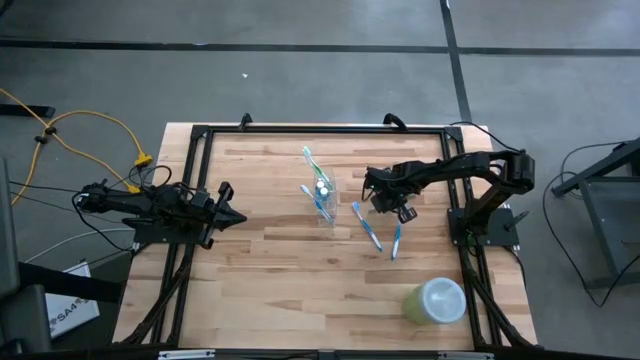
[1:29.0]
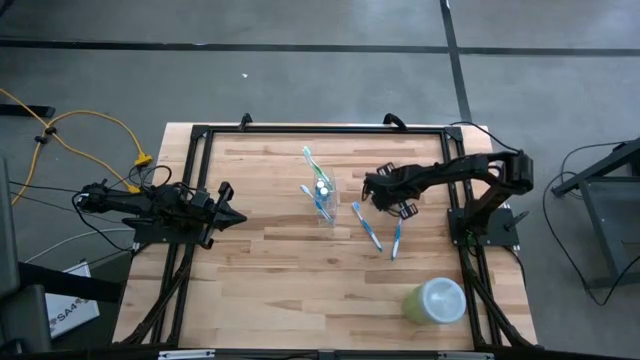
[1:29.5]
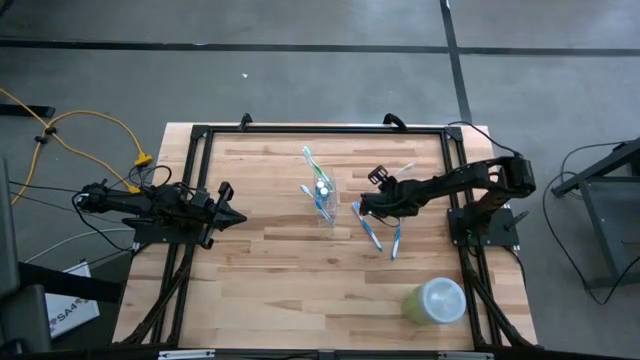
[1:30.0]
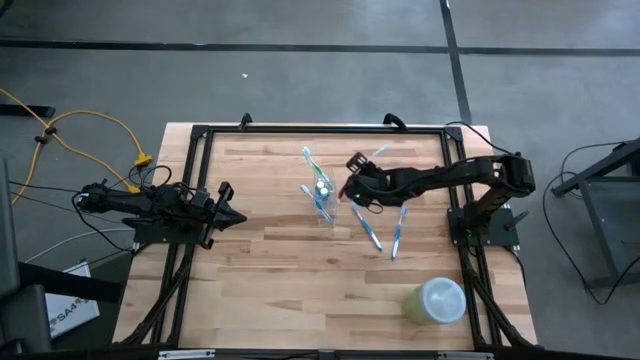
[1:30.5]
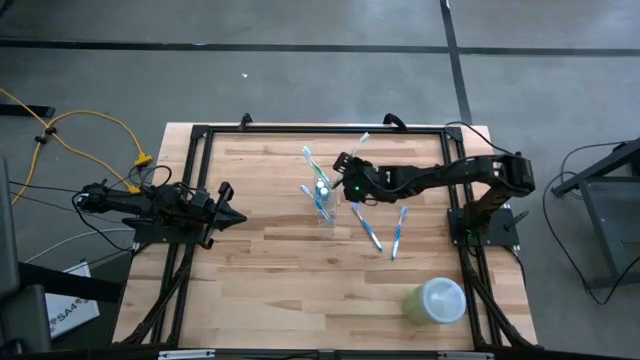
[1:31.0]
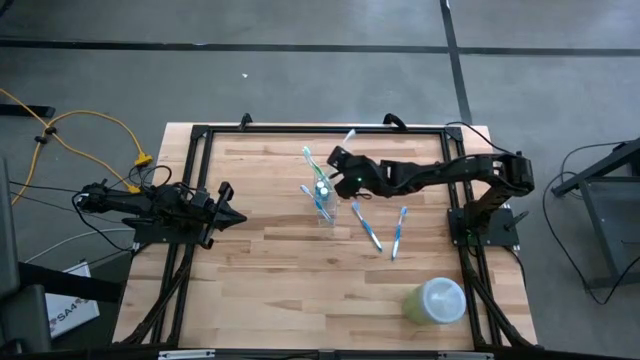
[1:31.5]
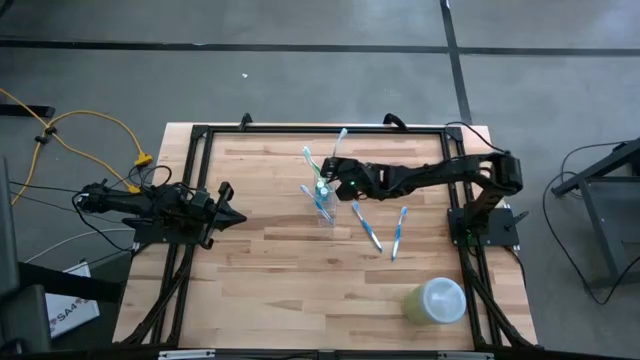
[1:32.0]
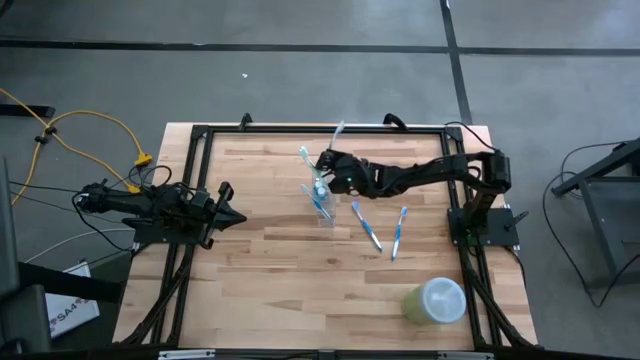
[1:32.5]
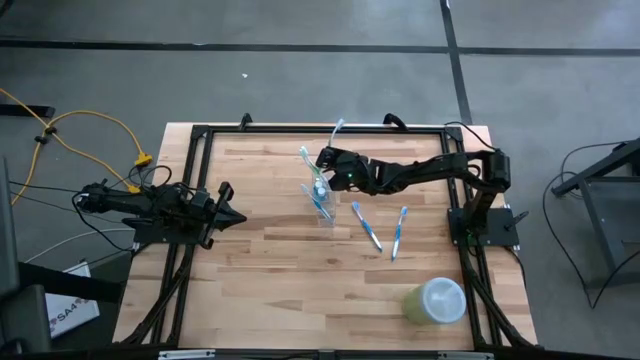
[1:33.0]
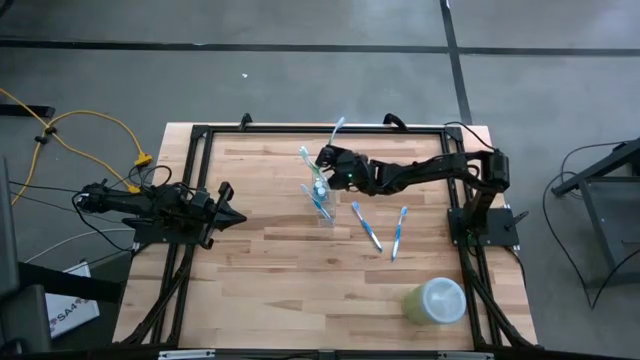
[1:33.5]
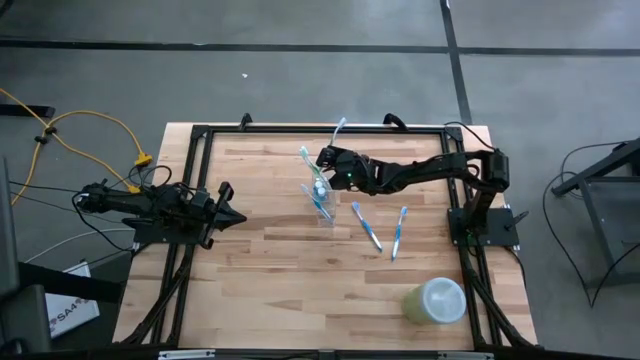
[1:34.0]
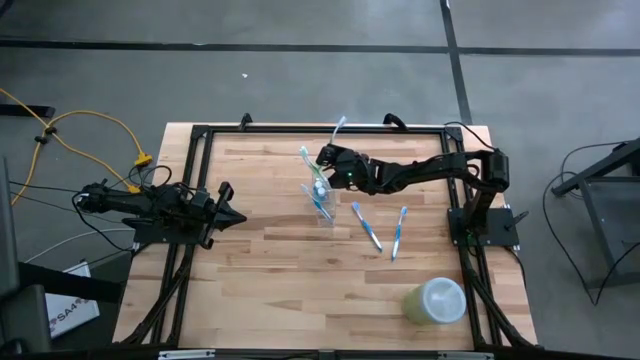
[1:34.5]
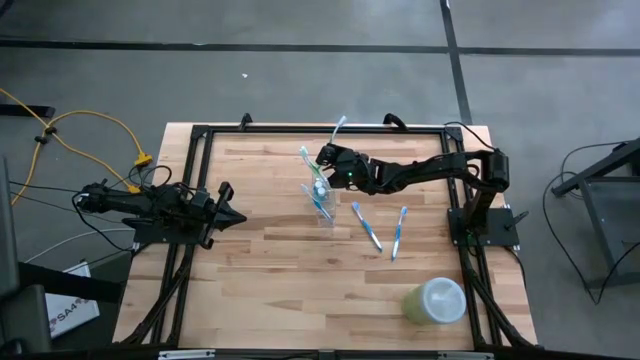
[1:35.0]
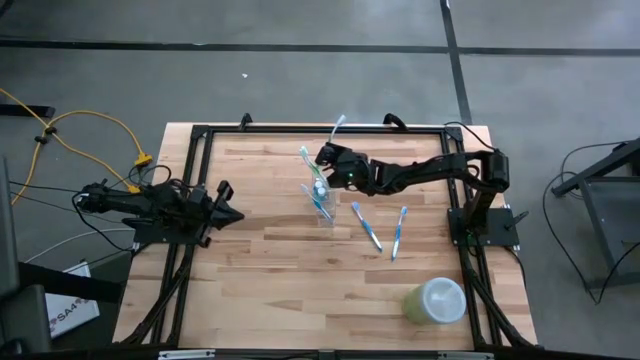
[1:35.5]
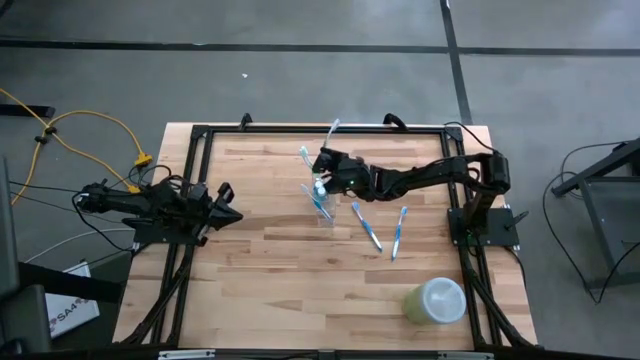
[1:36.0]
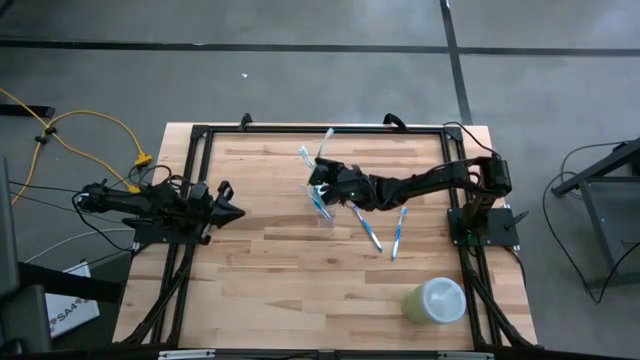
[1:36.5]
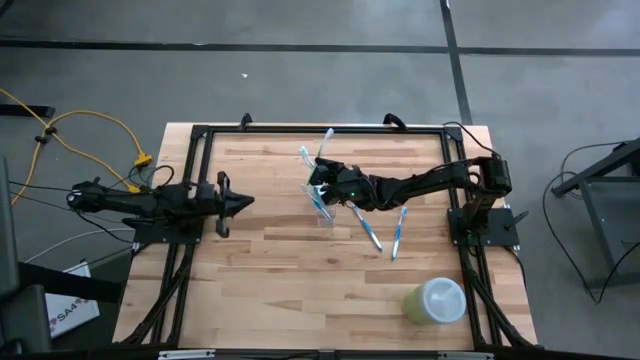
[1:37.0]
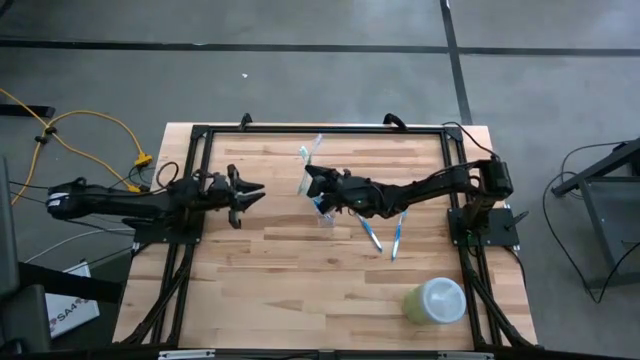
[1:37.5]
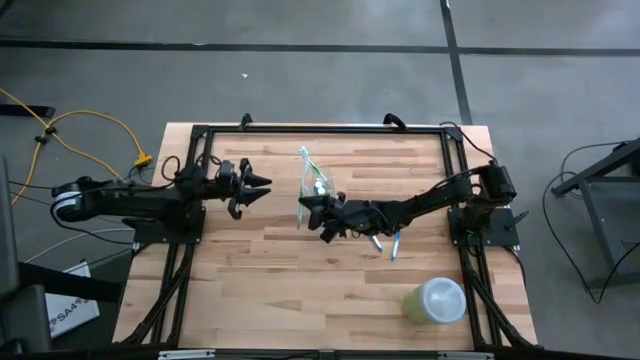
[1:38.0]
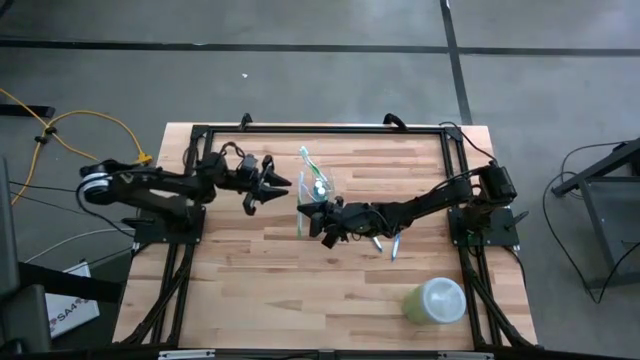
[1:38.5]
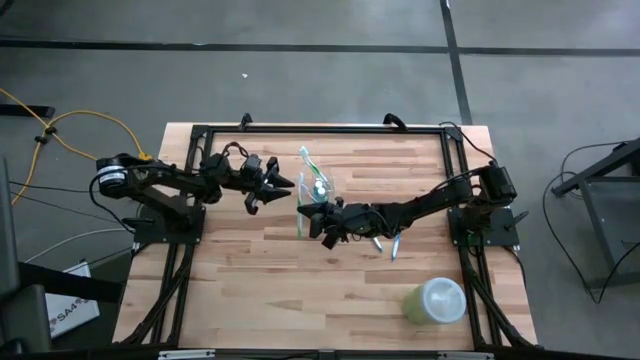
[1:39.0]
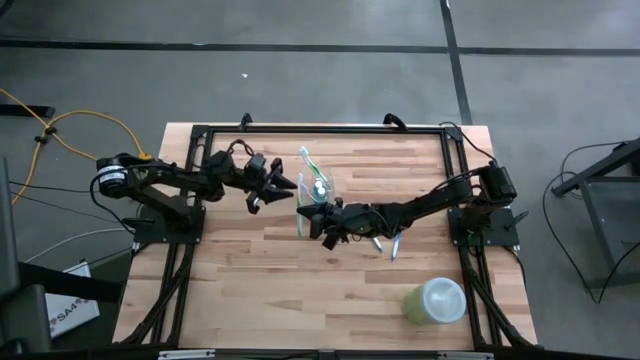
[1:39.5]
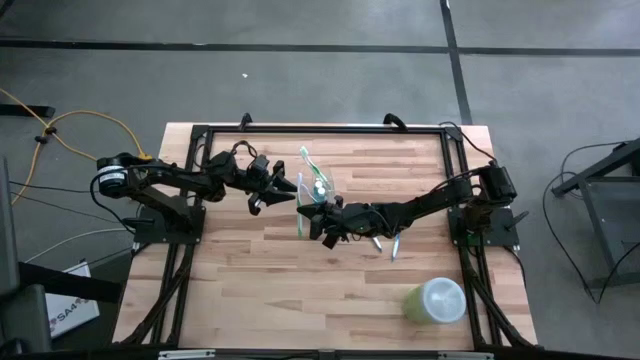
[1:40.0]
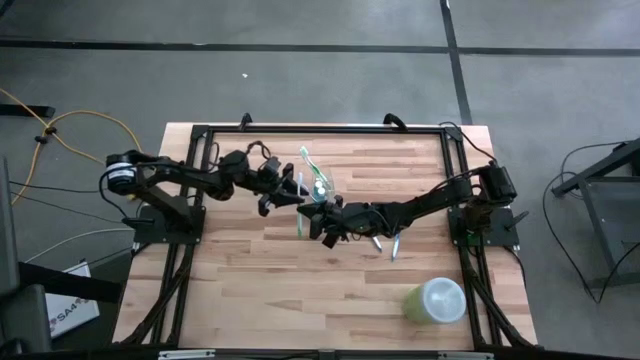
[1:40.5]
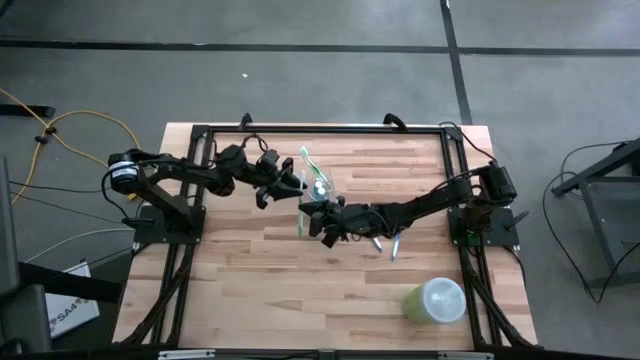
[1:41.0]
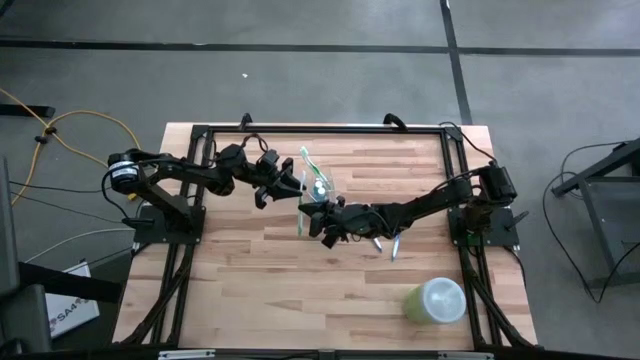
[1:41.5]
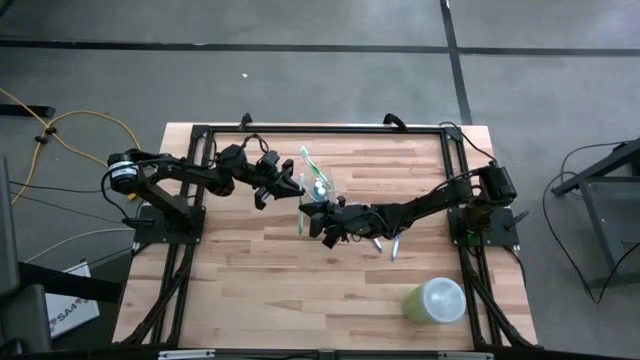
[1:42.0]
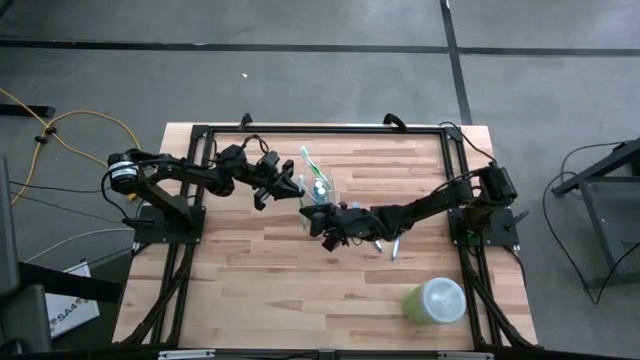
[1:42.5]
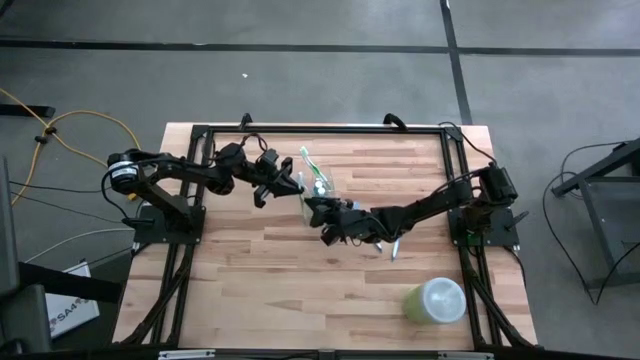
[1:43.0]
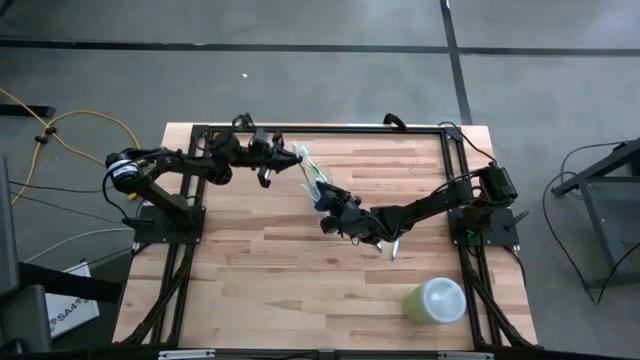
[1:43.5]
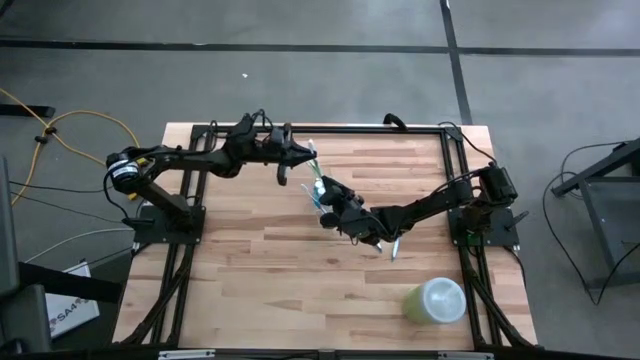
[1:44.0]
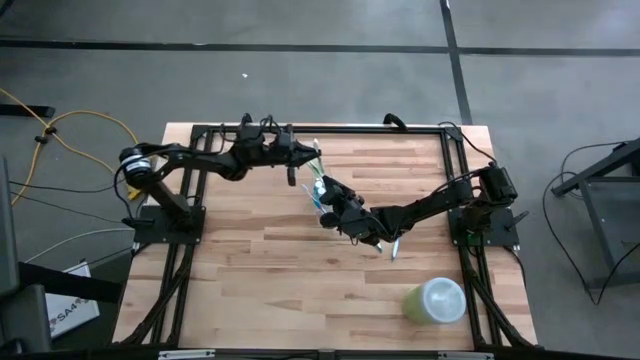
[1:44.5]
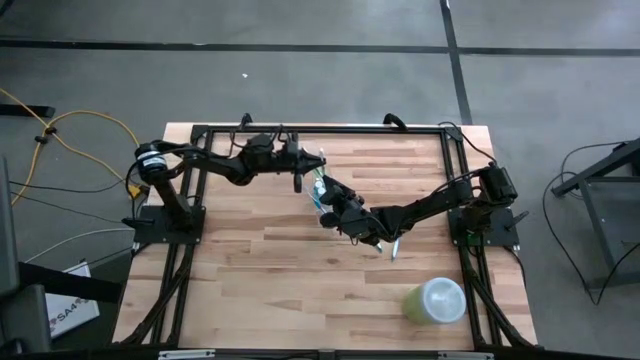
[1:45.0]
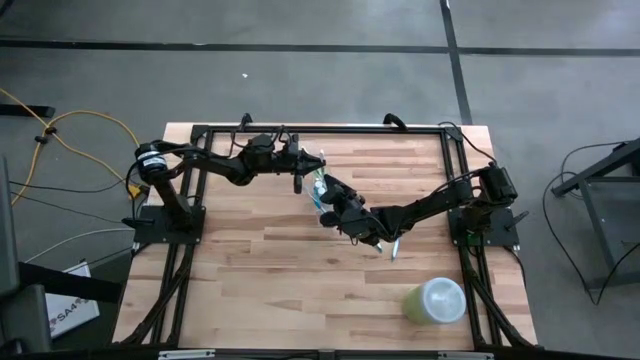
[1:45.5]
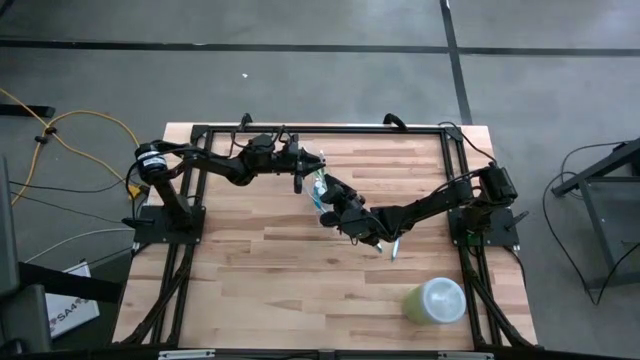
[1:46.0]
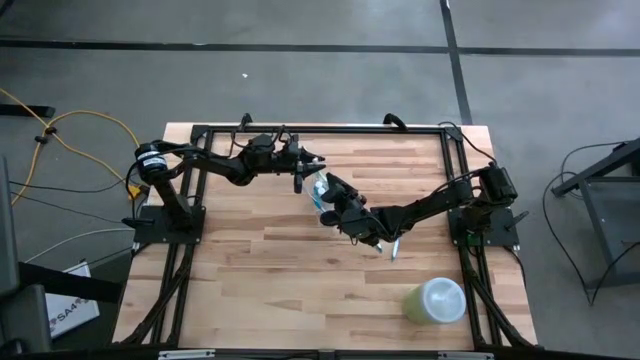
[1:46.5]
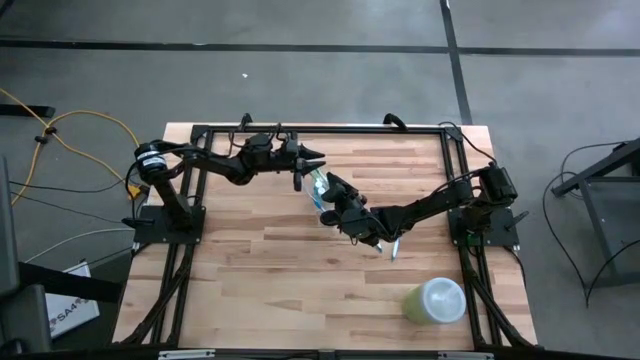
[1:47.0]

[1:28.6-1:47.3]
Task: Pick & Place toothbrushing station
Put the green toothbrush into the transparent organizer

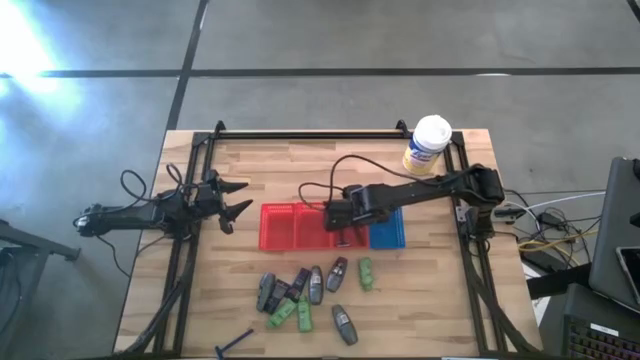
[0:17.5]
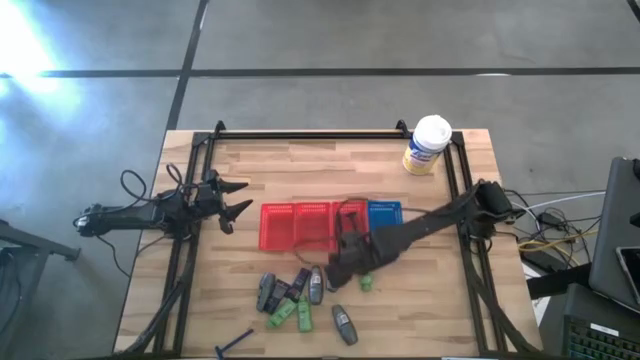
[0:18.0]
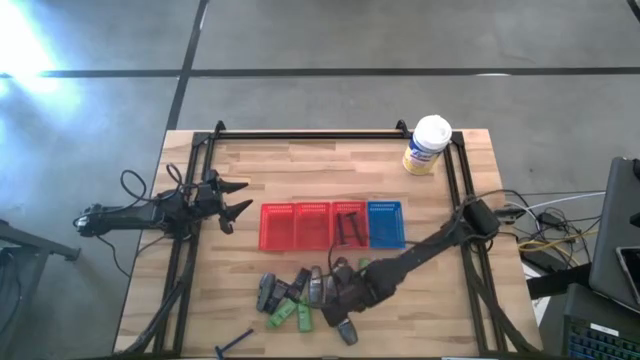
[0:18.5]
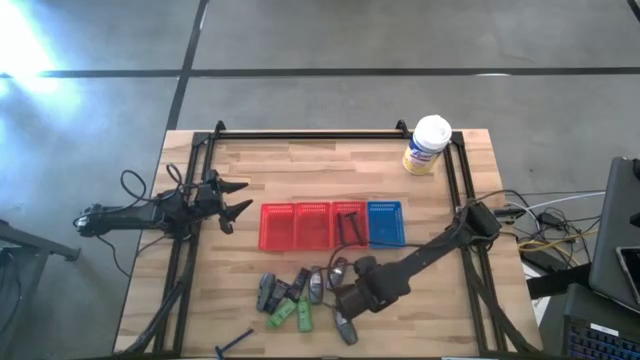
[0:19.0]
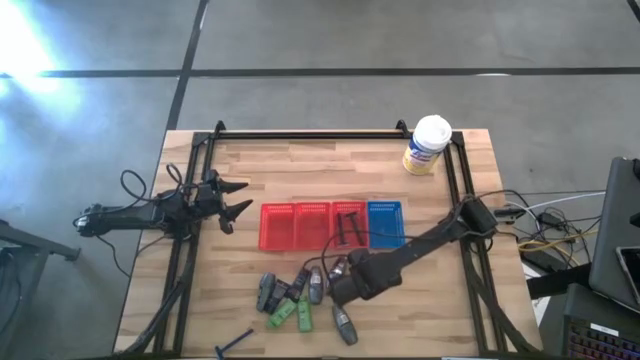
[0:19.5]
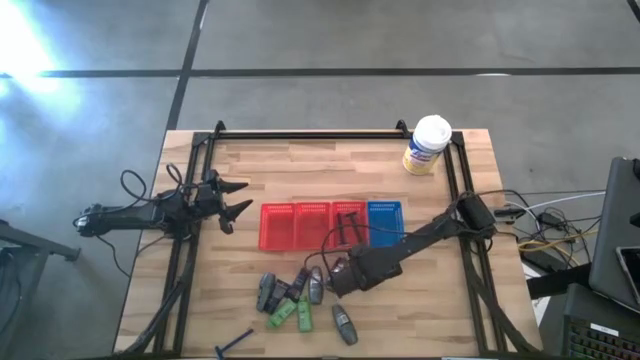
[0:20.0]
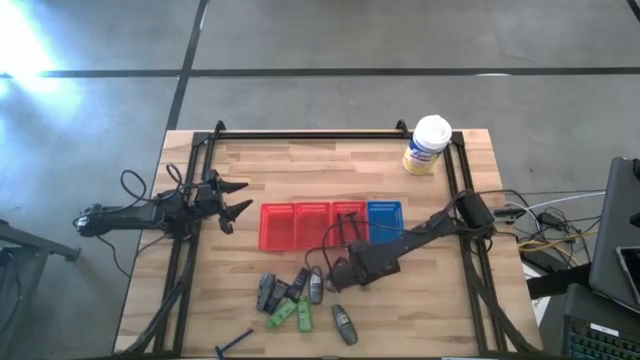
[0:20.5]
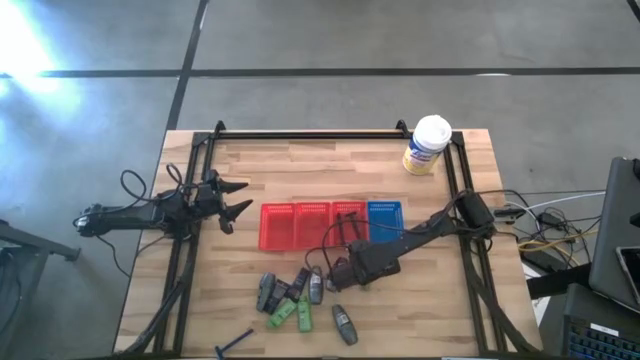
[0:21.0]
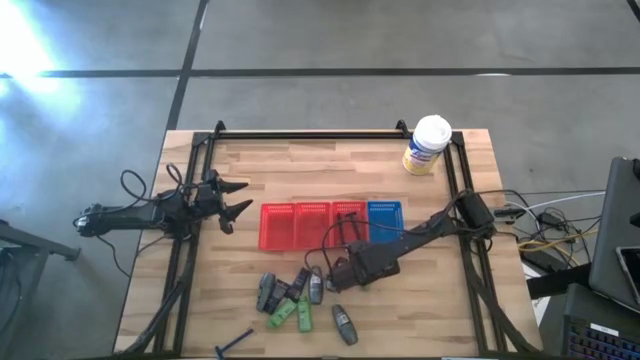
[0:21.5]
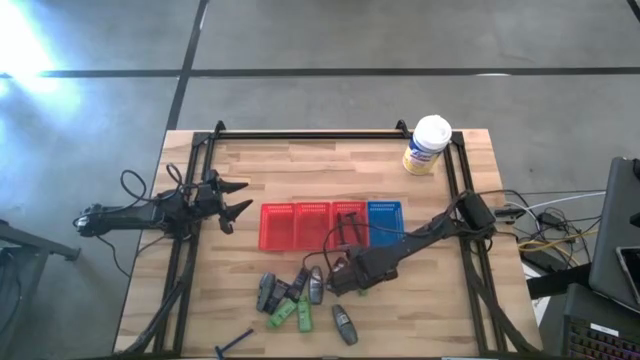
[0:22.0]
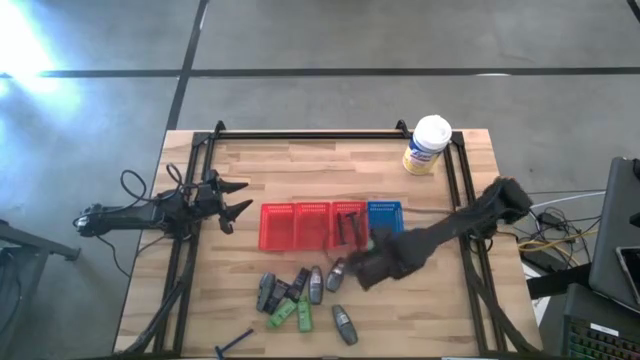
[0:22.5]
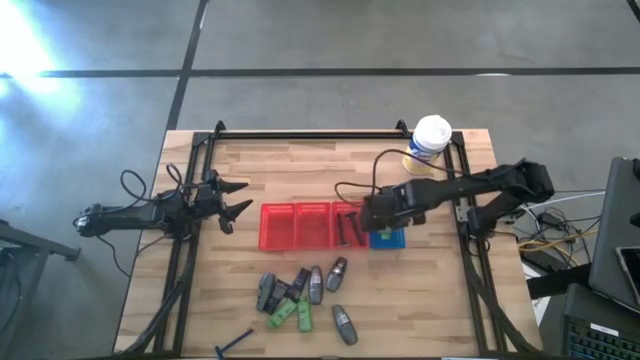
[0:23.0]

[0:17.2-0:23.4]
Task: Pick & Place Travel size toiletries
Put the green shampoo into the blue bin
